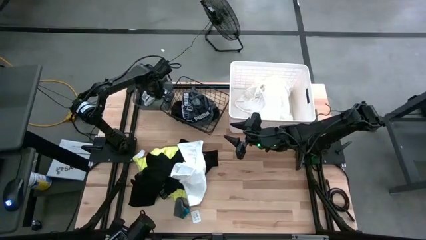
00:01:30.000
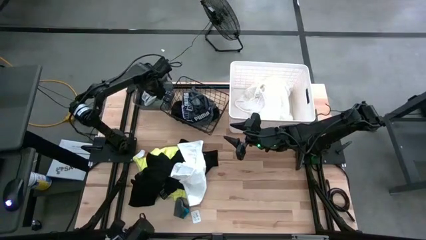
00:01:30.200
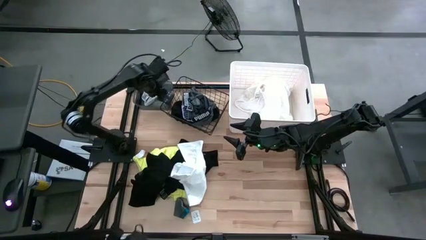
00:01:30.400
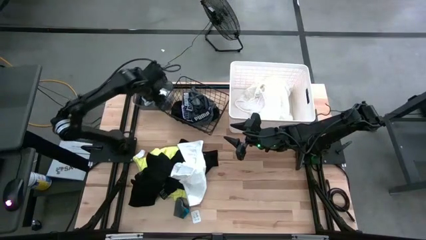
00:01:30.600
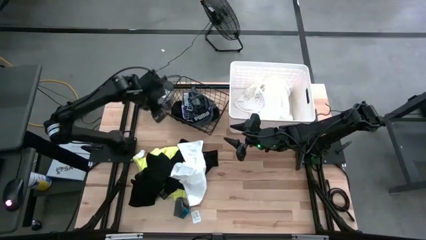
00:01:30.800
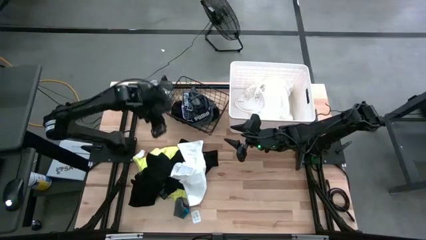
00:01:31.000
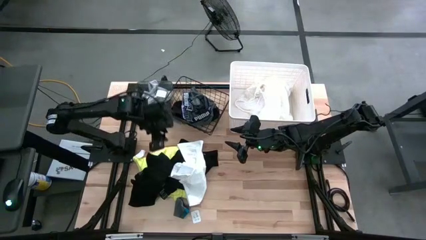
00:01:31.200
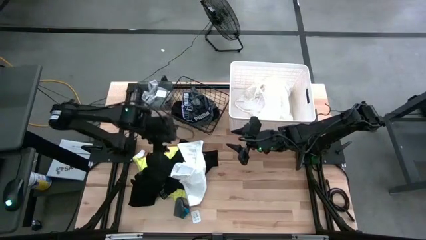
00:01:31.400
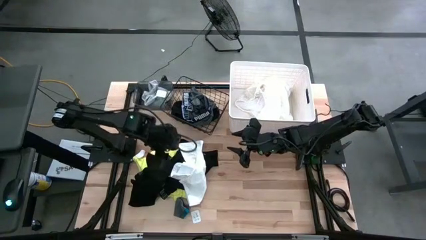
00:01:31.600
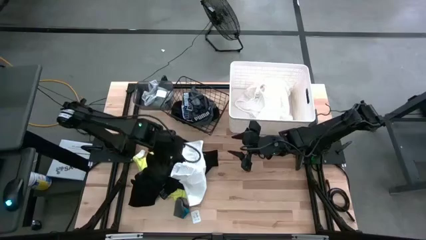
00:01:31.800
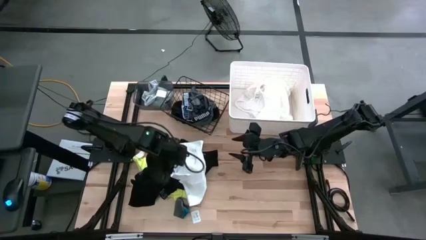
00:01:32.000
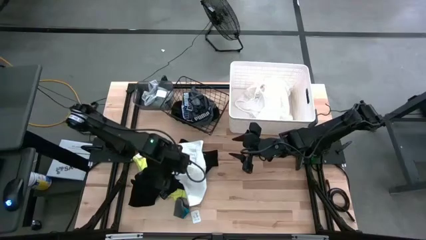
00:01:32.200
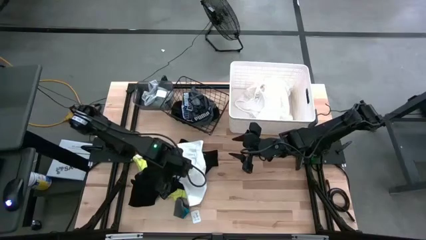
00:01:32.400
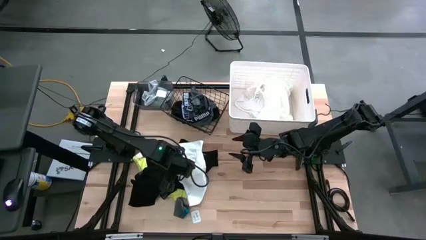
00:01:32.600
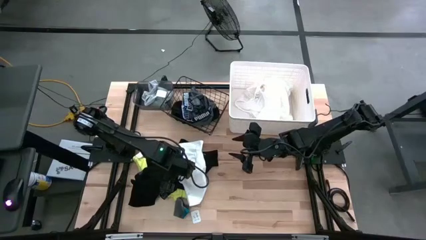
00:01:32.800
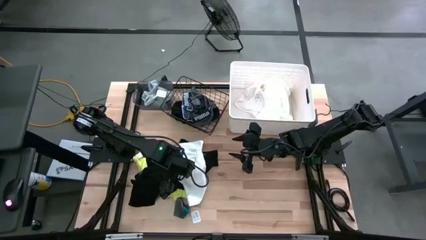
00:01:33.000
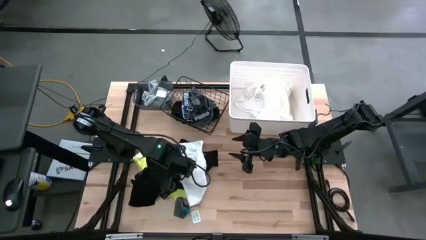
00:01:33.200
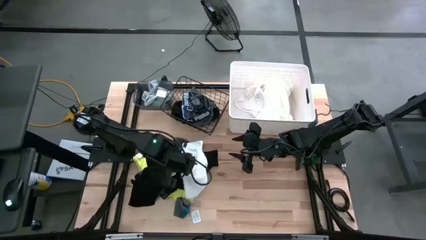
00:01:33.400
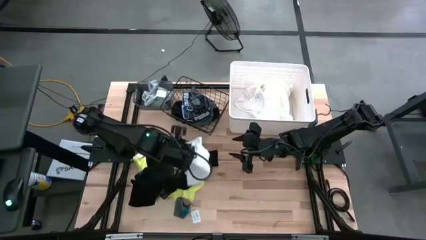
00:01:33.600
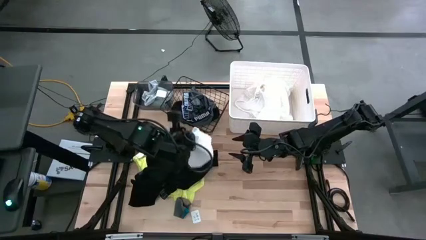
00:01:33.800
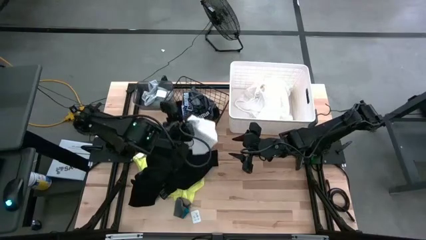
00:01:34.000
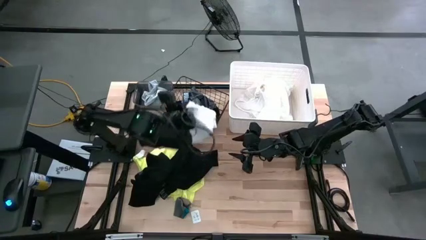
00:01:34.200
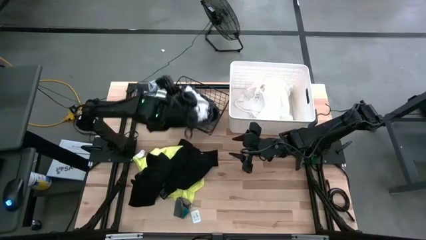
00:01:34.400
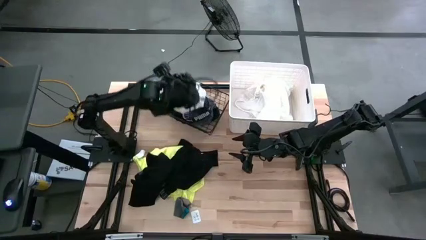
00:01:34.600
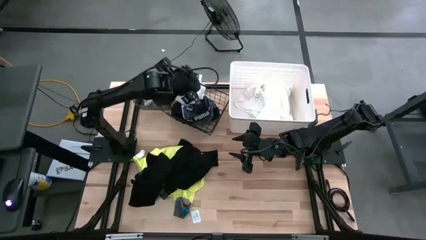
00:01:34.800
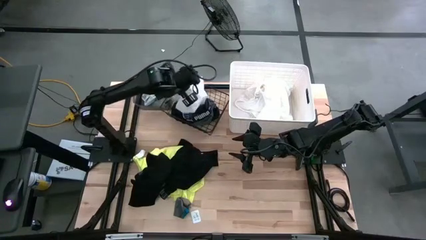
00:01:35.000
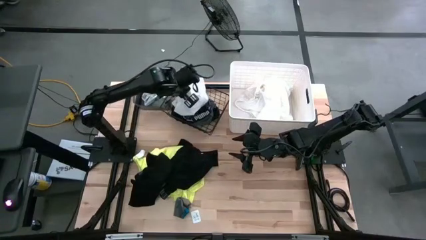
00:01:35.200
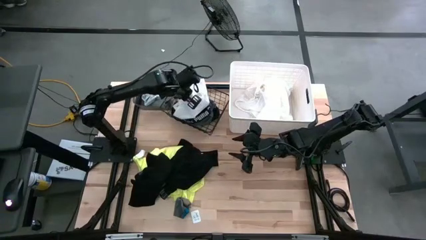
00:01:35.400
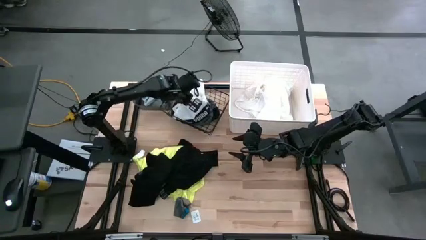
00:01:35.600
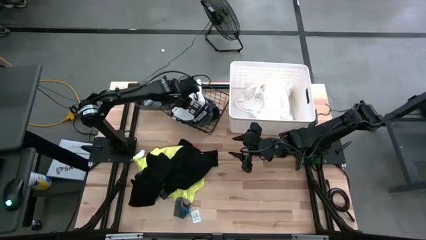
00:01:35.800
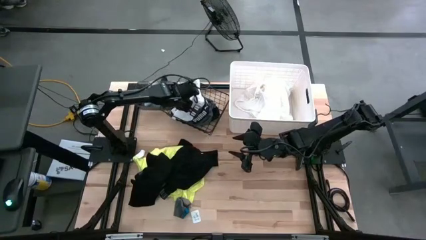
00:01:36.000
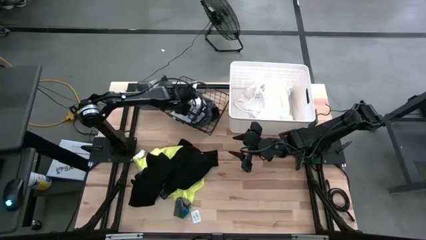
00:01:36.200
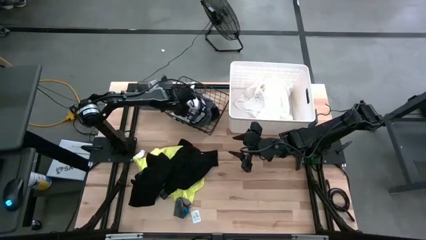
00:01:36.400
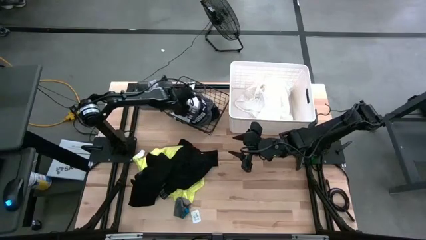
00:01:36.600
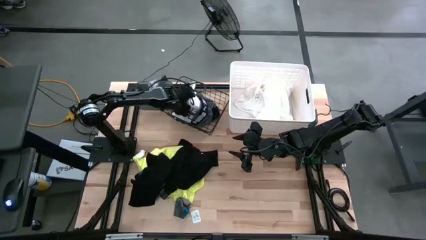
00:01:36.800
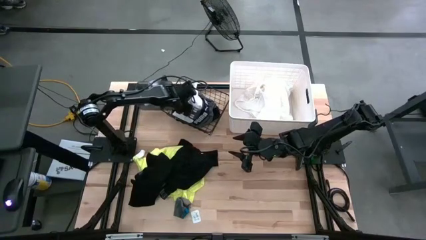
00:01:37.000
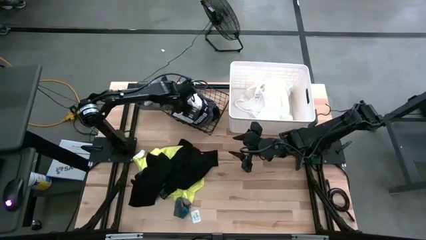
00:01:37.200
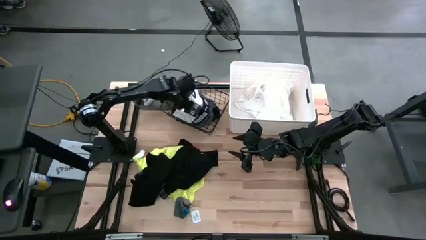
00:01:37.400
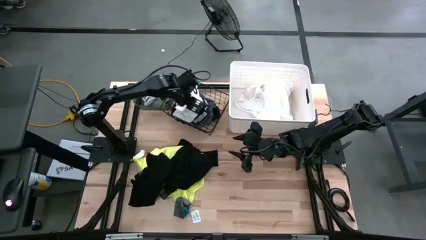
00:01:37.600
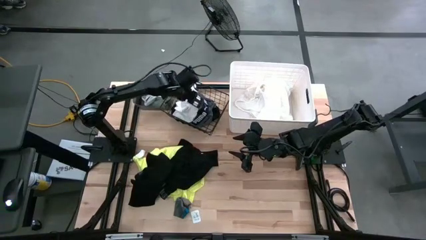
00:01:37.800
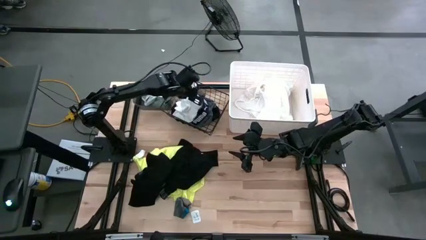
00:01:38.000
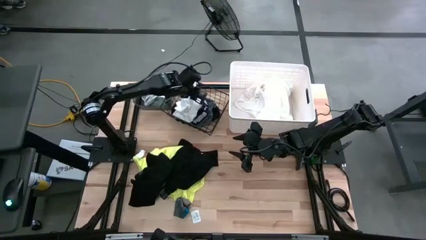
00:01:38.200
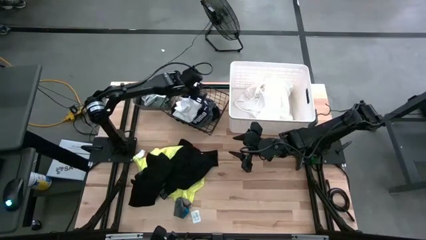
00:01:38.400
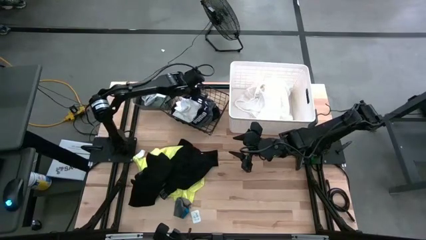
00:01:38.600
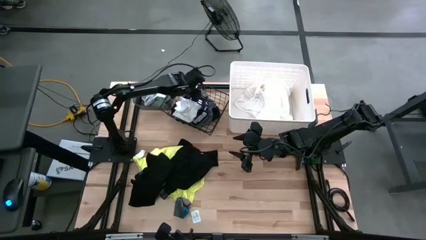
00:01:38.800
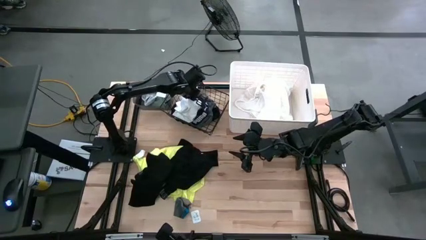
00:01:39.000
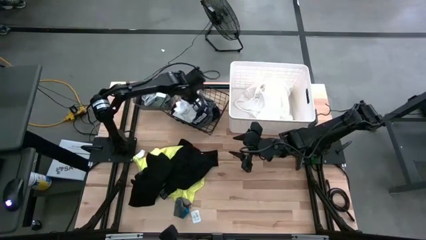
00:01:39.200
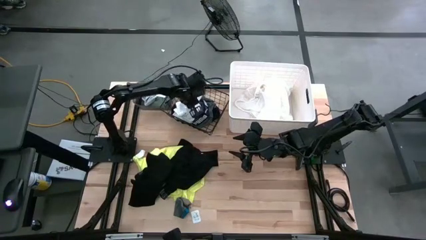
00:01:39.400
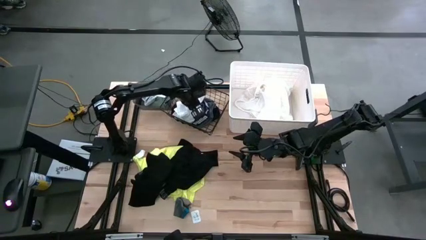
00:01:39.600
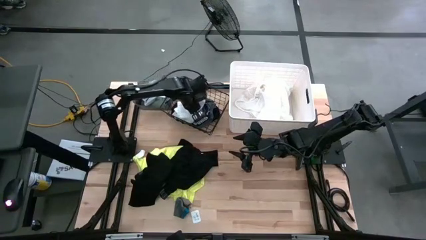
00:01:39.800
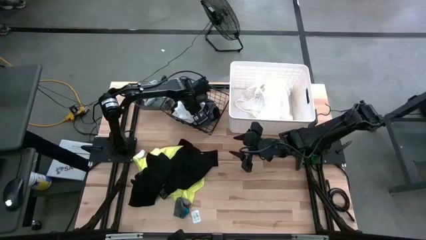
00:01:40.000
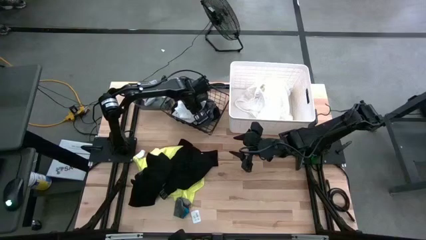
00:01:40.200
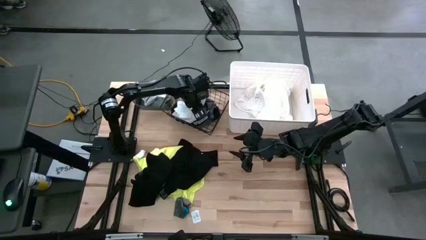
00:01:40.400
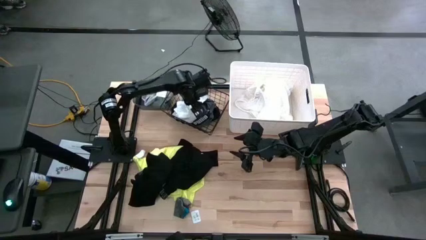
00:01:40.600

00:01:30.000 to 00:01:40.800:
Task: Pick & Place Cloths
Put the white underwear into the wire basket

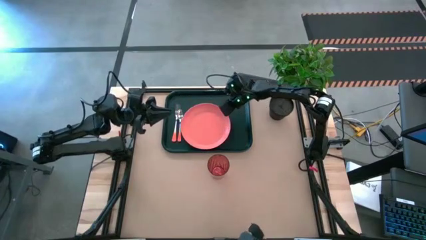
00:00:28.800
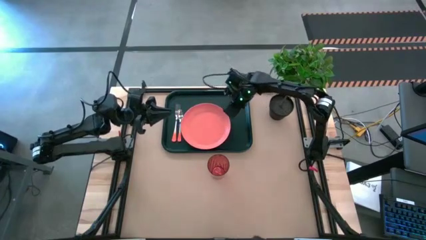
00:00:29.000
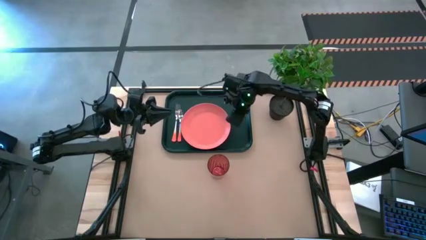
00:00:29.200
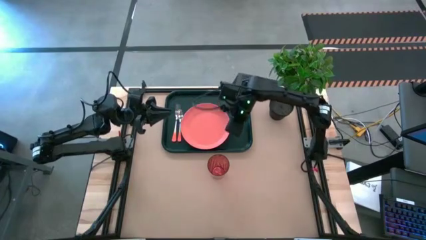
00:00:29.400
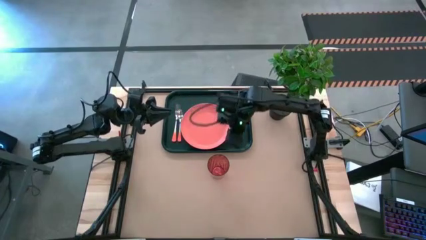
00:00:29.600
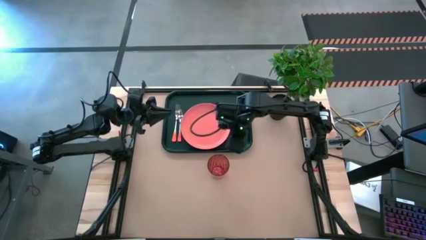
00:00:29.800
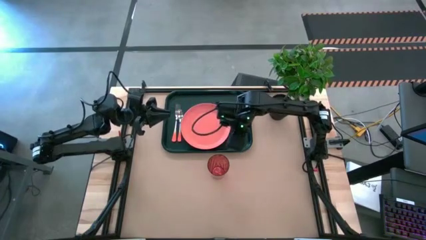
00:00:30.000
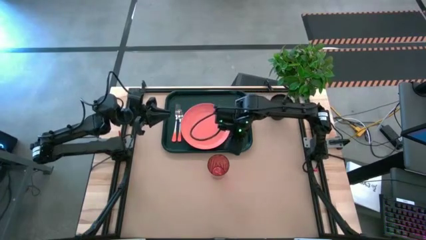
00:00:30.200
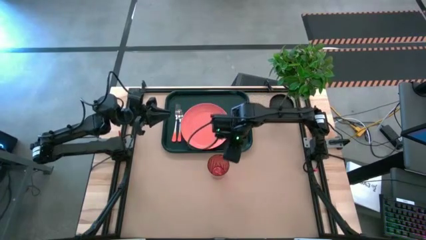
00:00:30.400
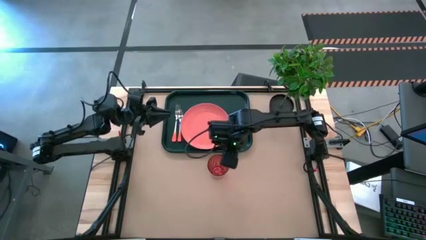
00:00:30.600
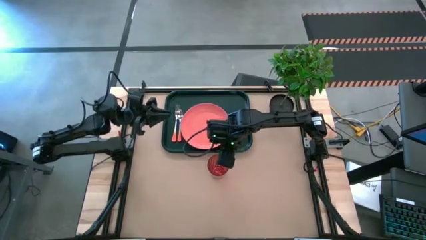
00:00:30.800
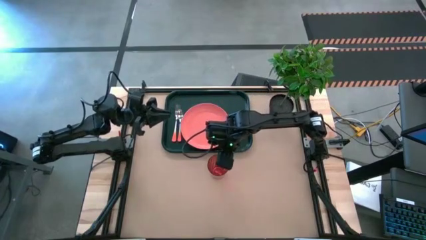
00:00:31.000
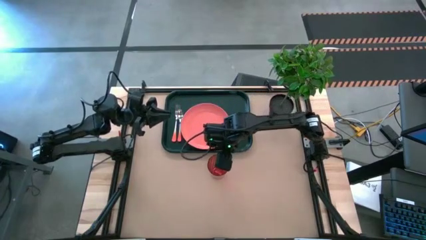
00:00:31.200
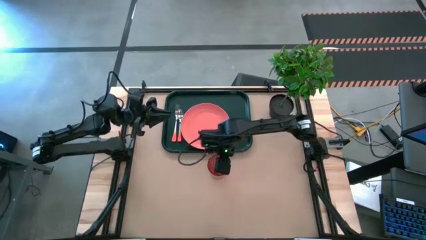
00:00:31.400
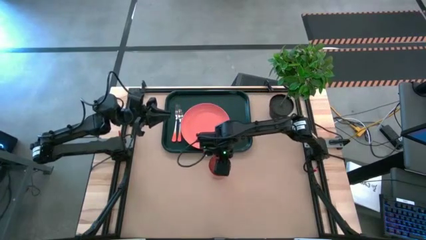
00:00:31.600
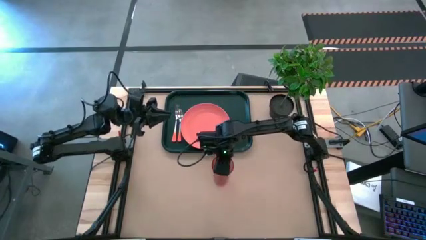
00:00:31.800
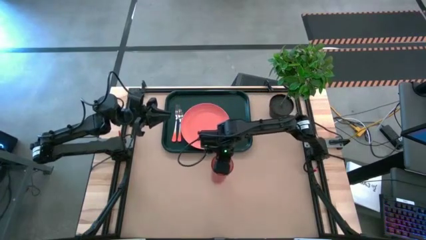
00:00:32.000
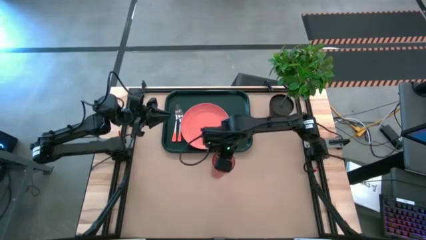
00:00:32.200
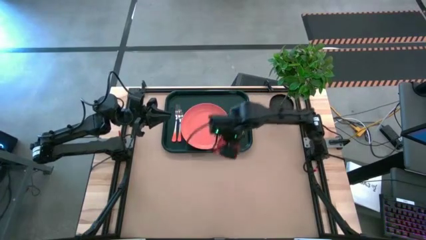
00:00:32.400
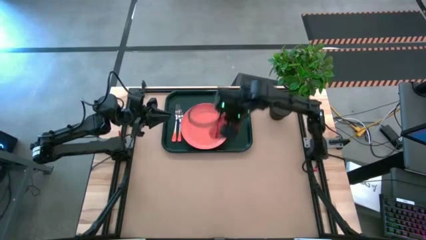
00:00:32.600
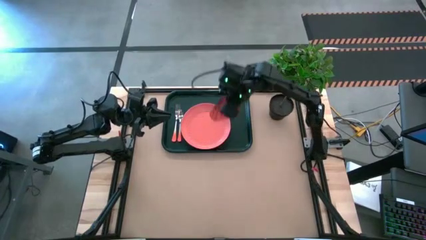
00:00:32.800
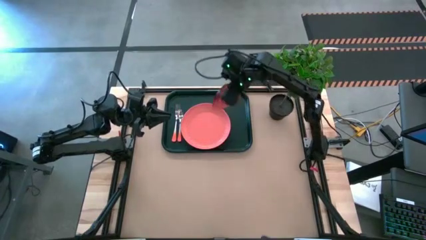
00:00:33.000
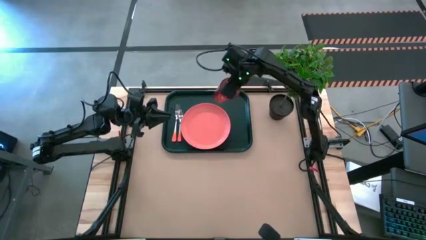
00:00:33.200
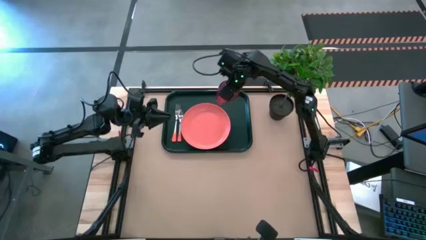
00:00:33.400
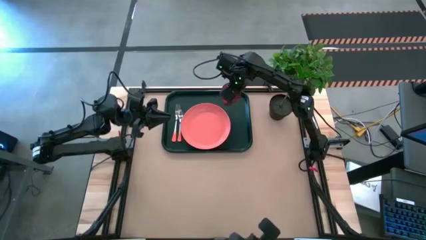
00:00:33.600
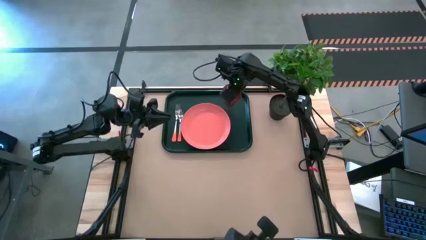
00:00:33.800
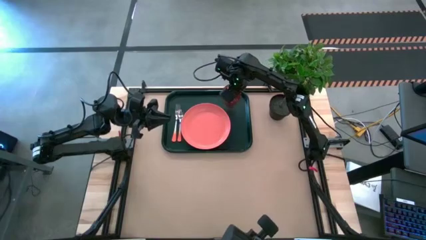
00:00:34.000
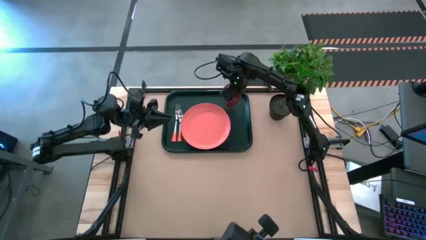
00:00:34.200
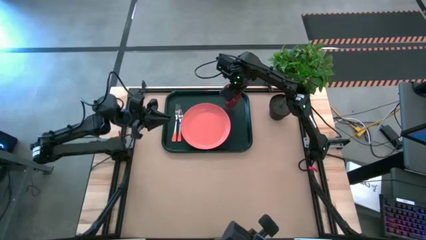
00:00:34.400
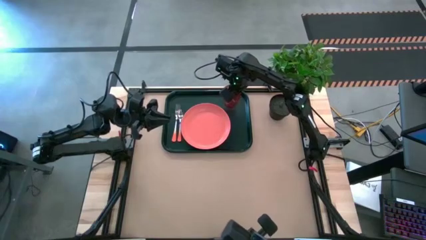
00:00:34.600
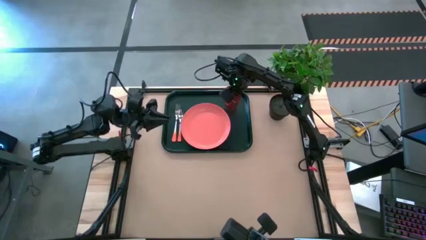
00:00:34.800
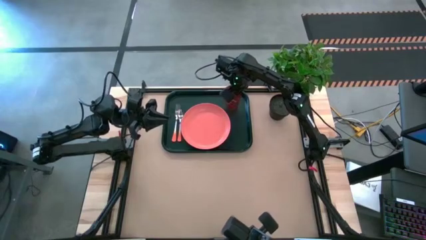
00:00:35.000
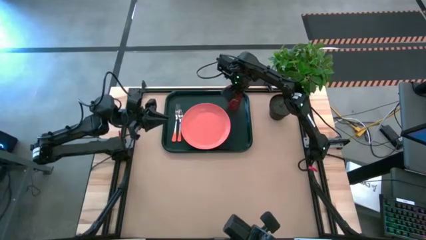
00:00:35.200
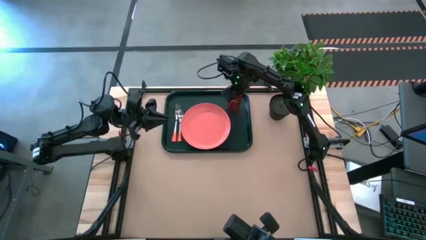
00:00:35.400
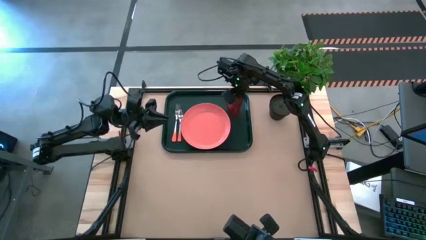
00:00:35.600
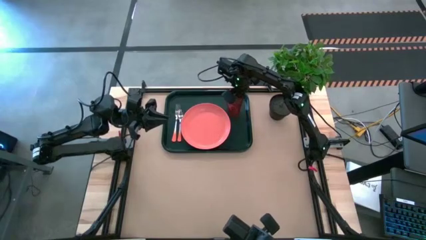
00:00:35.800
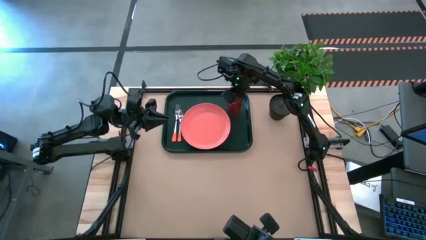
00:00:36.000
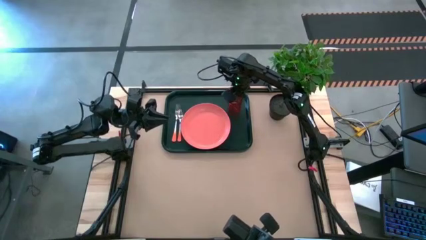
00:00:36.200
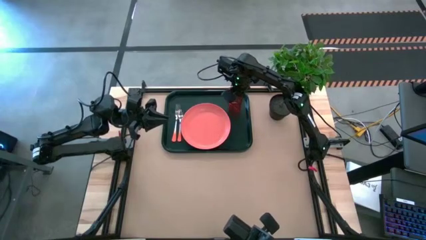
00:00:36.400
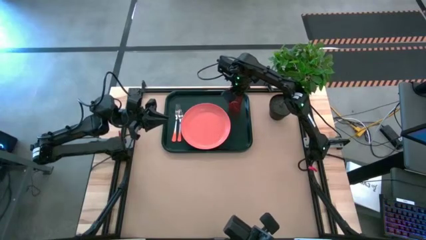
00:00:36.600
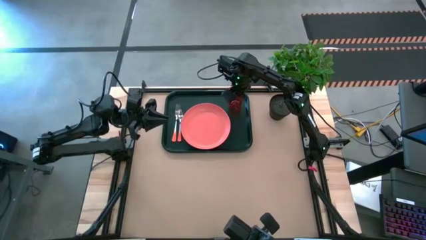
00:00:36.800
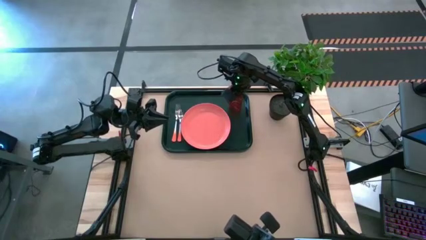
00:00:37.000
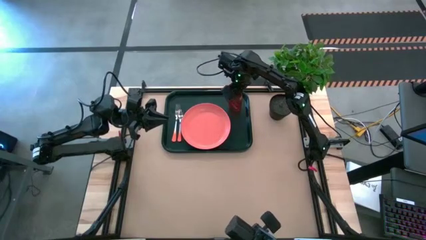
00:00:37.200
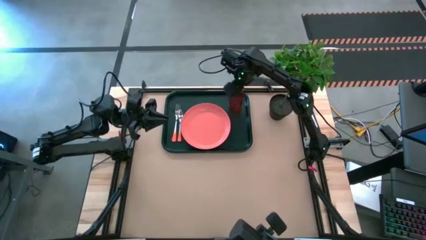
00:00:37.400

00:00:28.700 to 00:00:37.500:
Task: Pick and place plate/cup/fork/spoon on tray
Put the orange cup on the black serving tray to the top right of the orange plate
